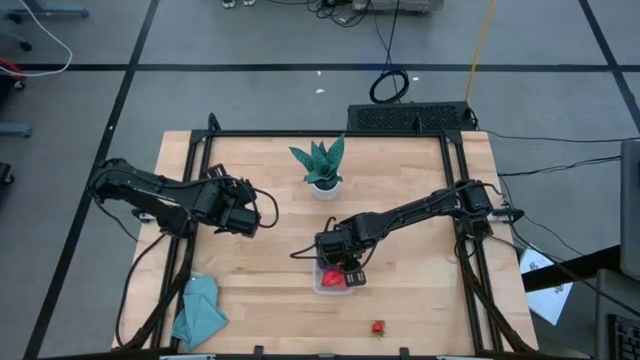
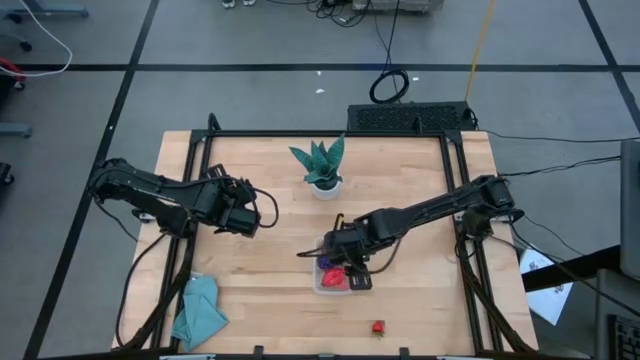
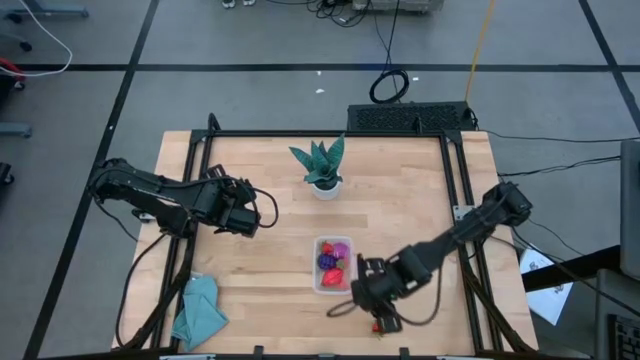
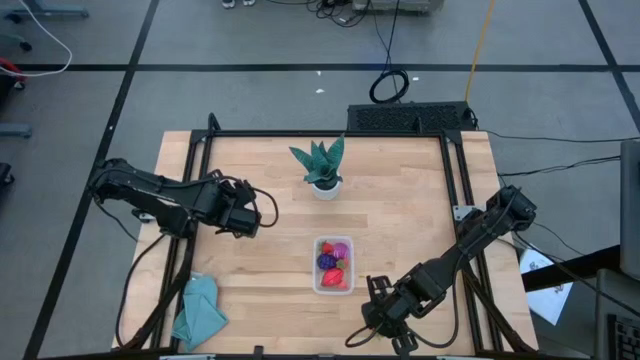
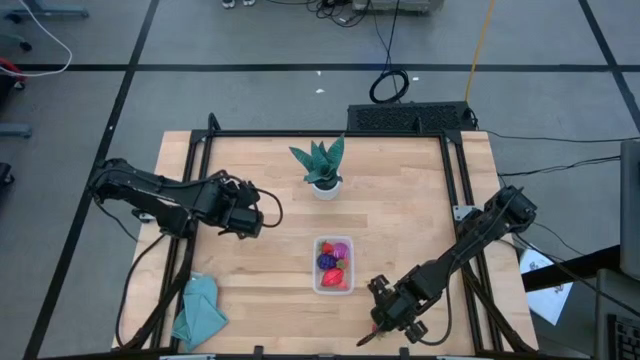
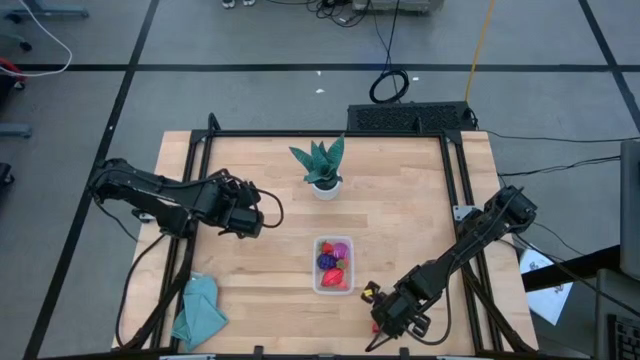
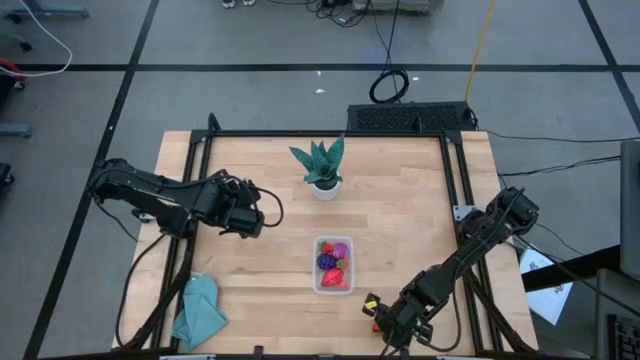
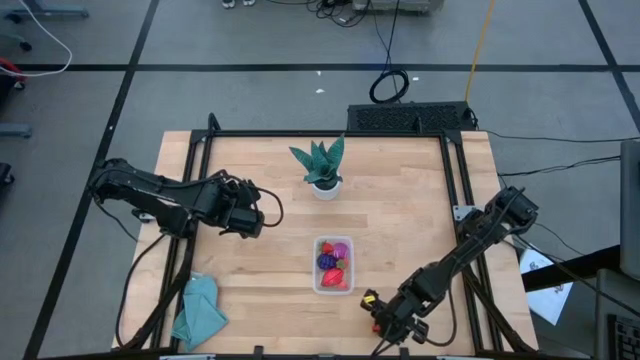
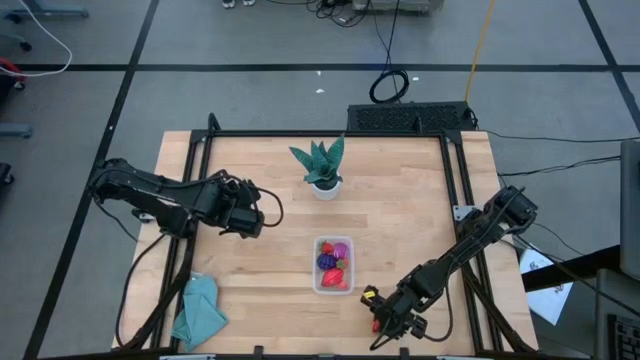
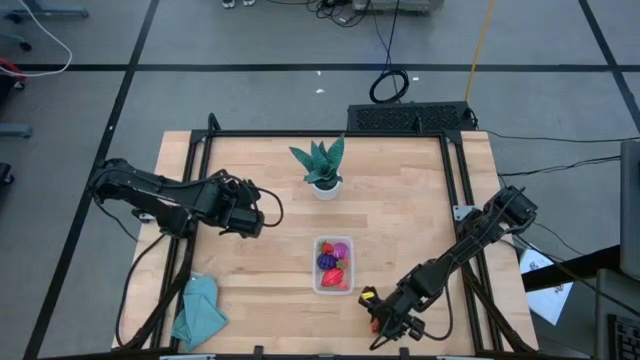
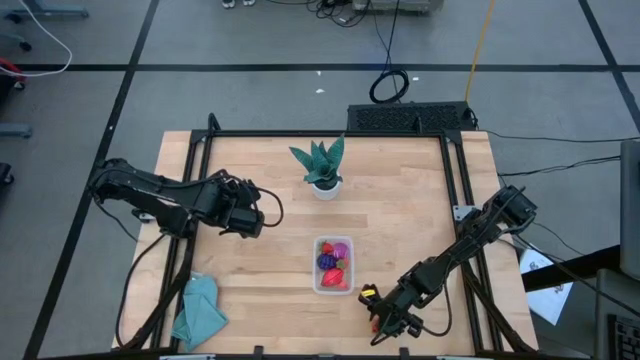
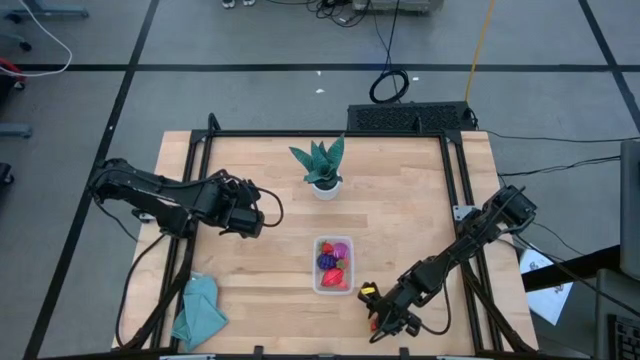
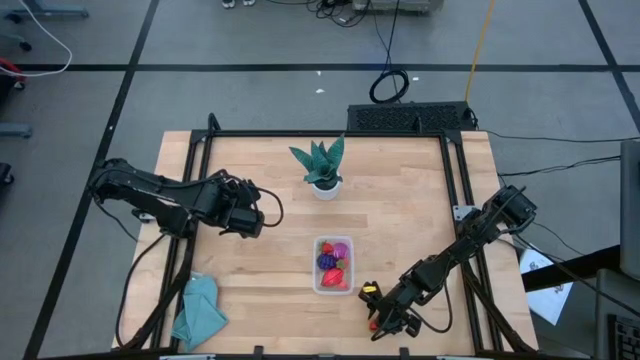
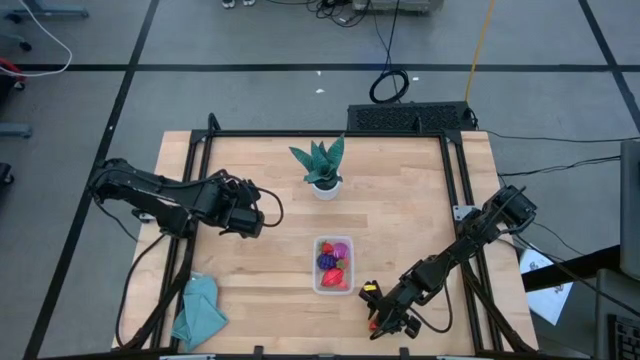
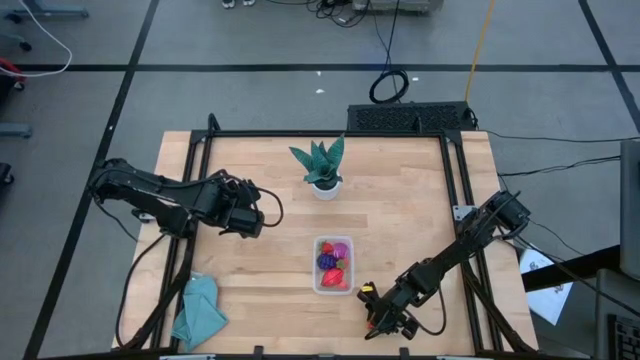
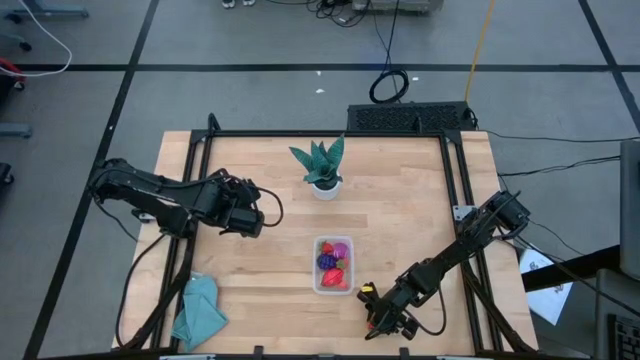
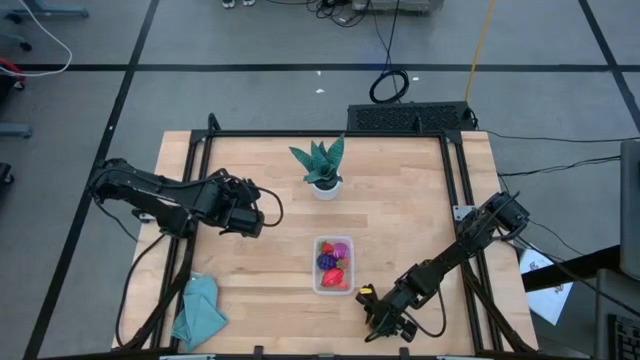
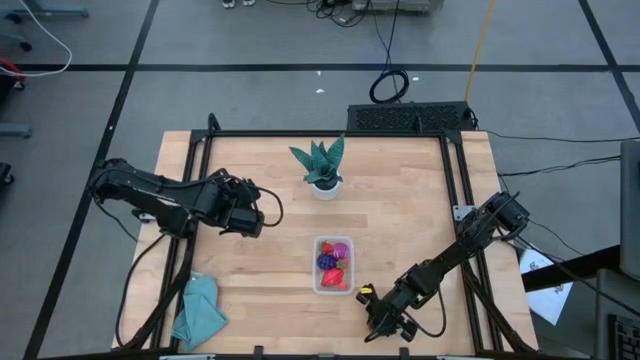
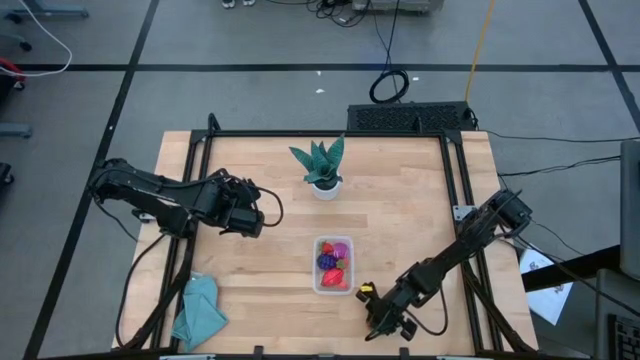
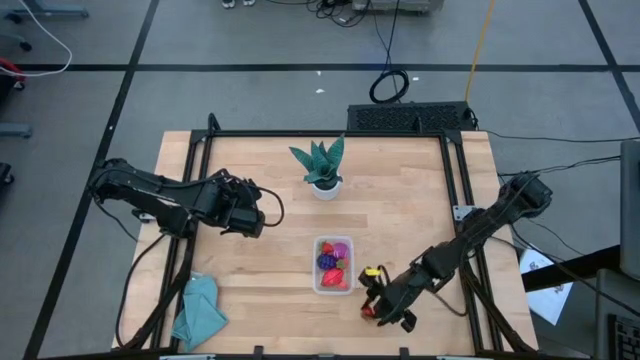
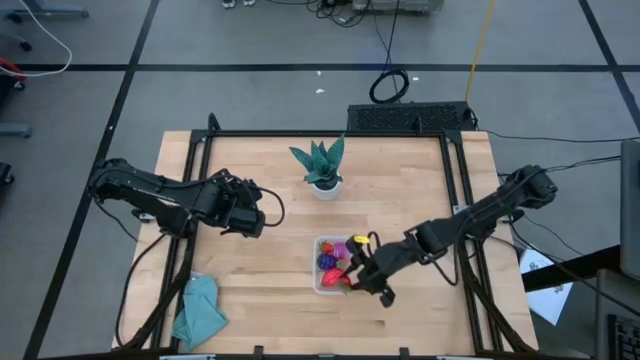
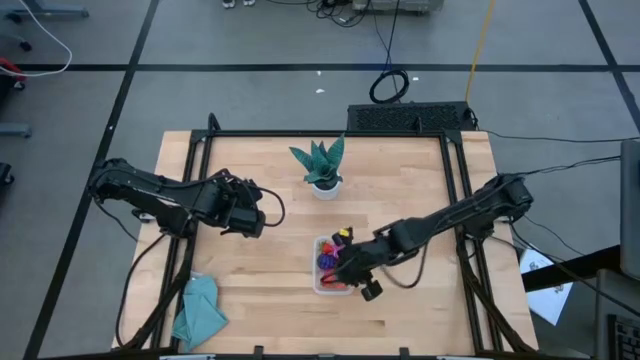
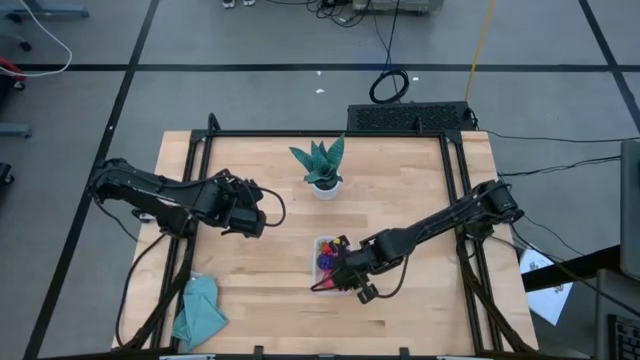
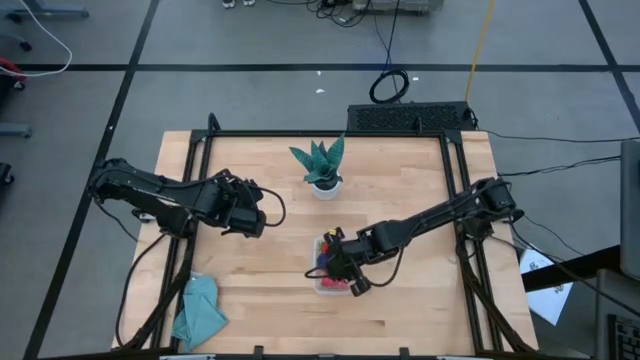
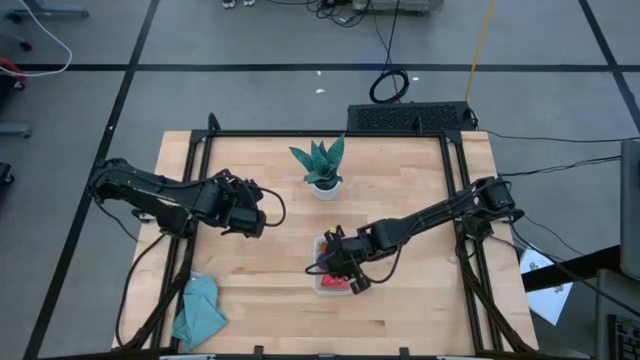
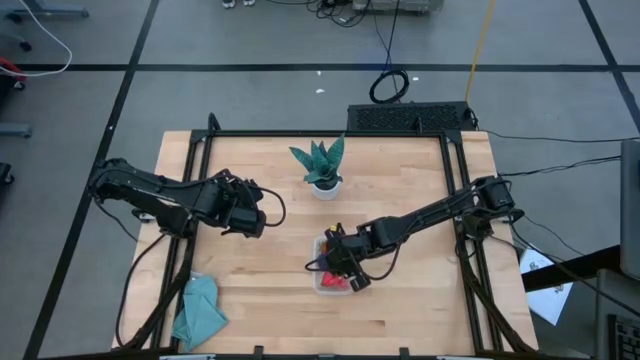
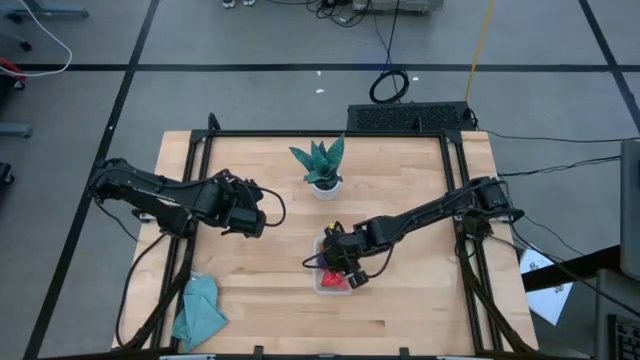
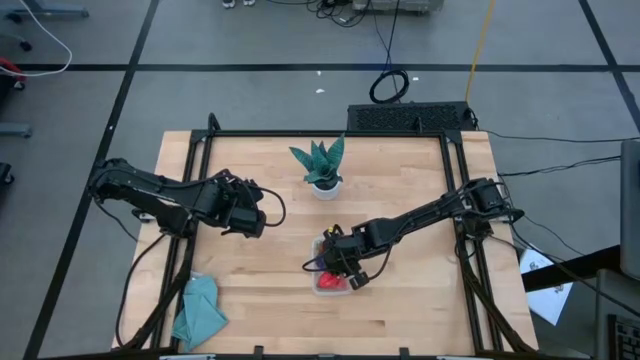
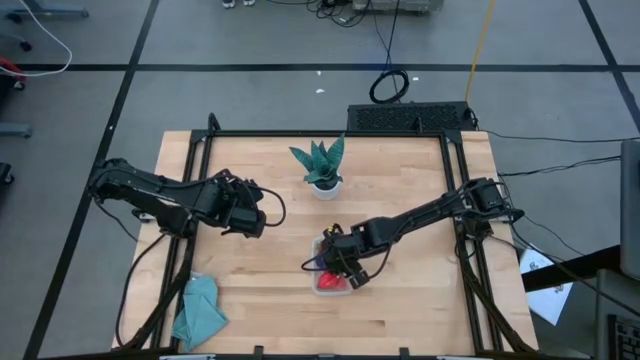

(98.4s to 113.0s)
Task: Pick and placing Produce into tupperware
Put the red strawberry into the transparent bin

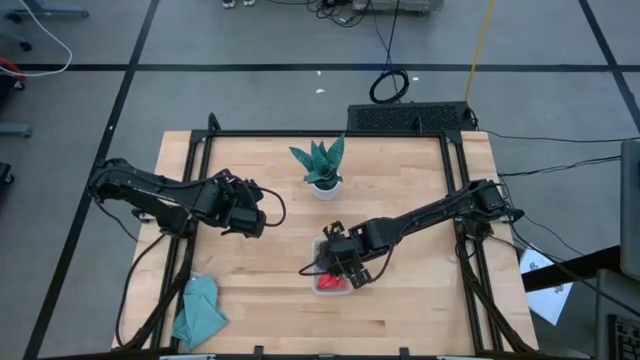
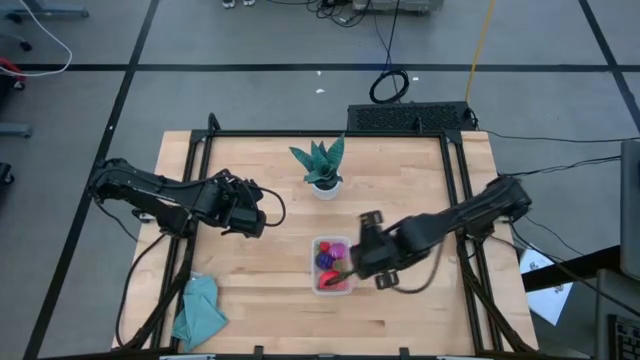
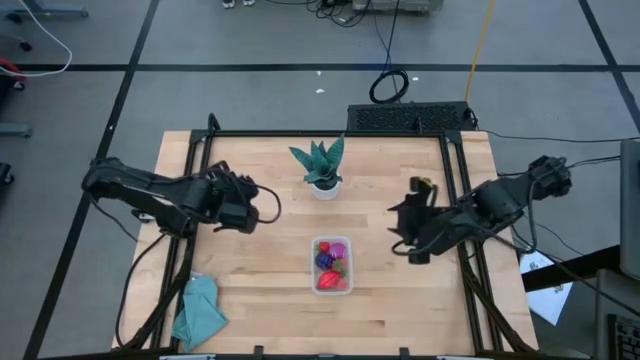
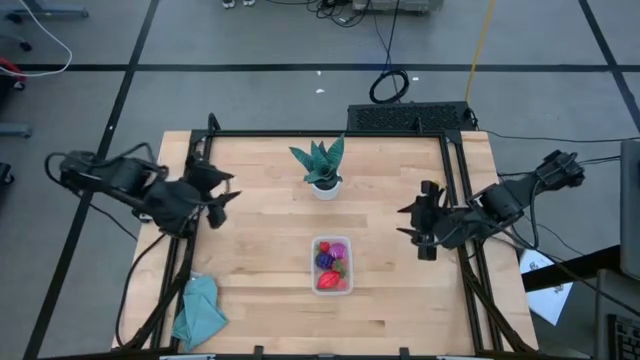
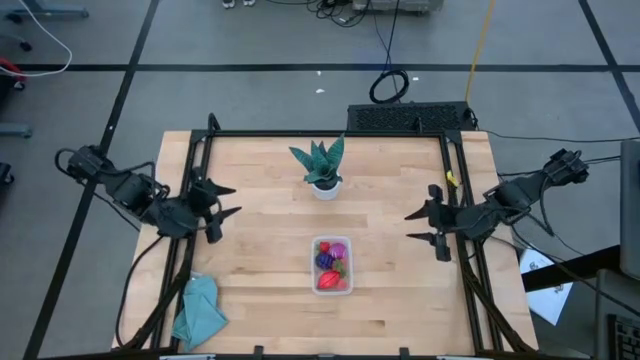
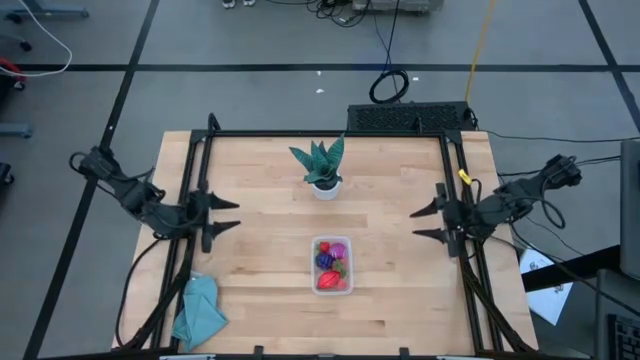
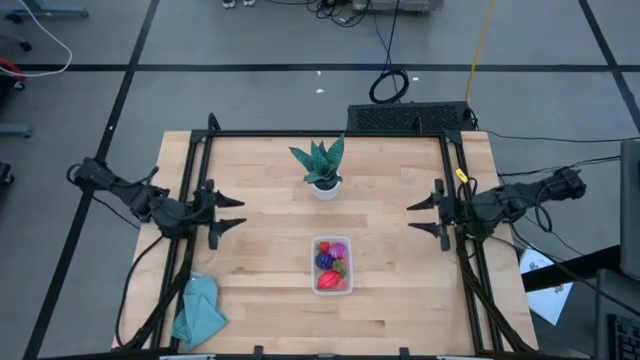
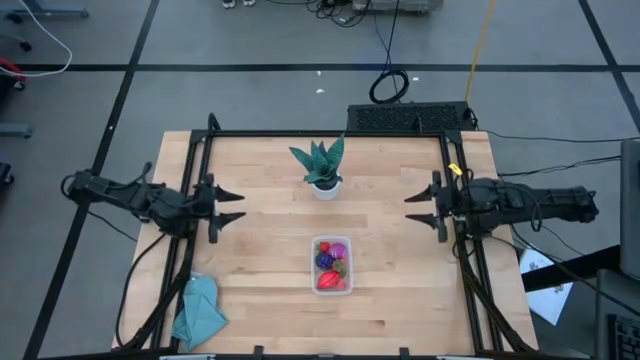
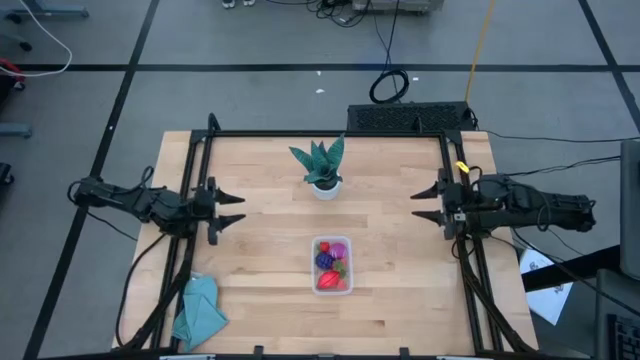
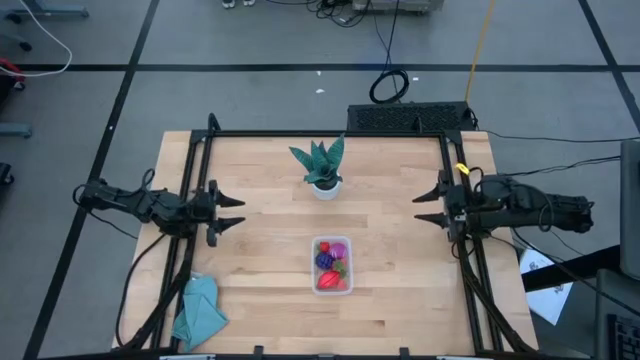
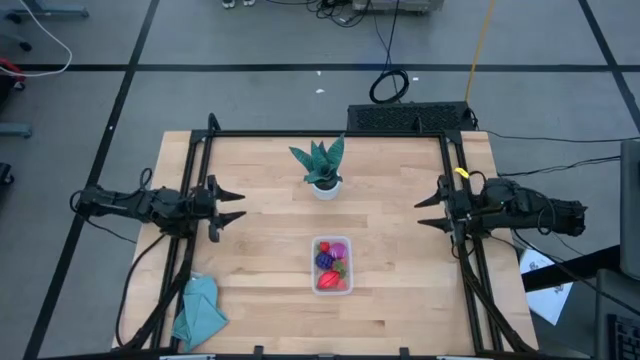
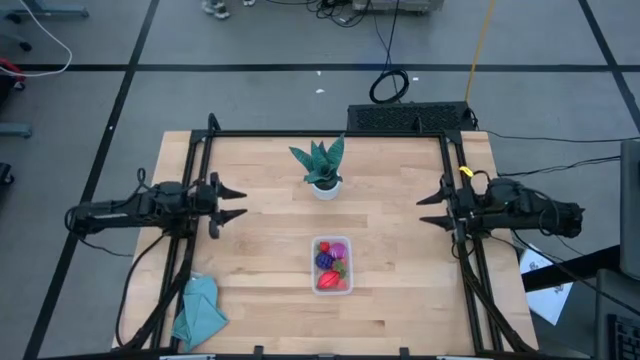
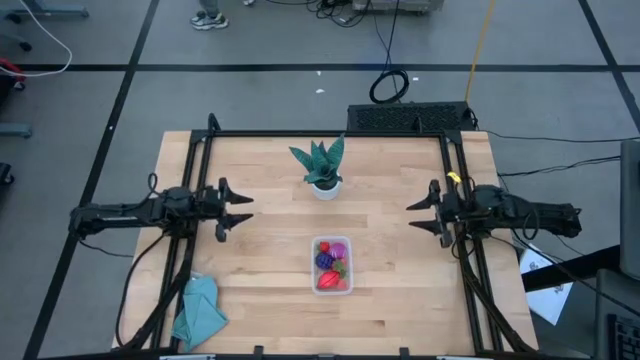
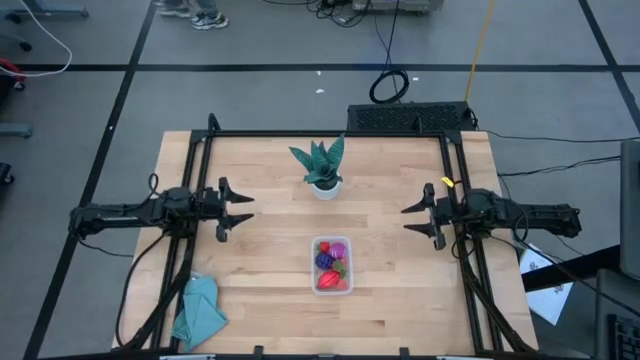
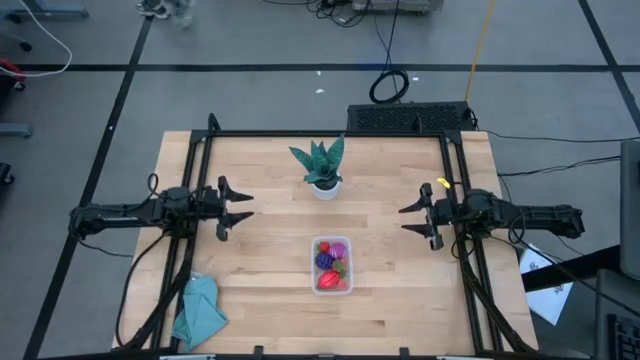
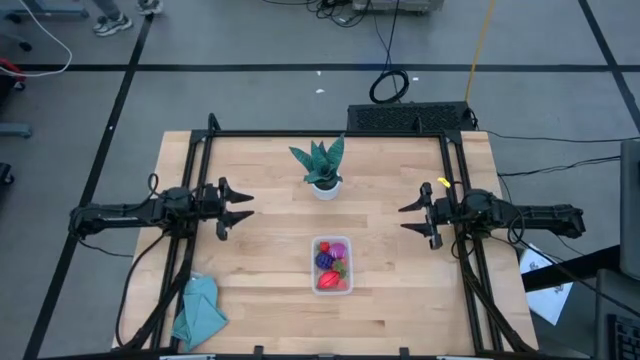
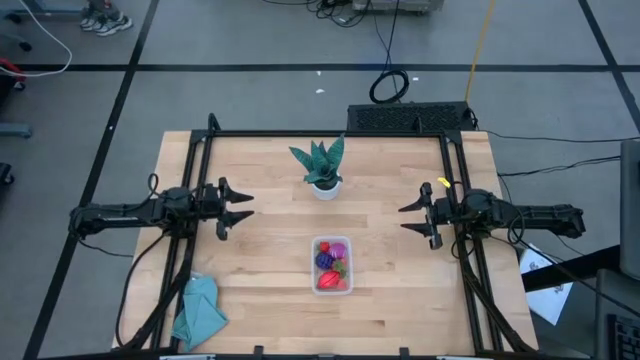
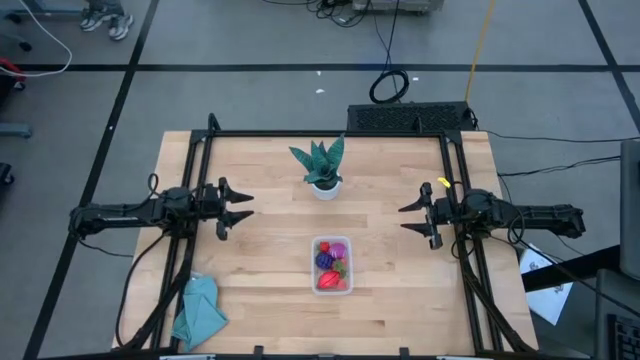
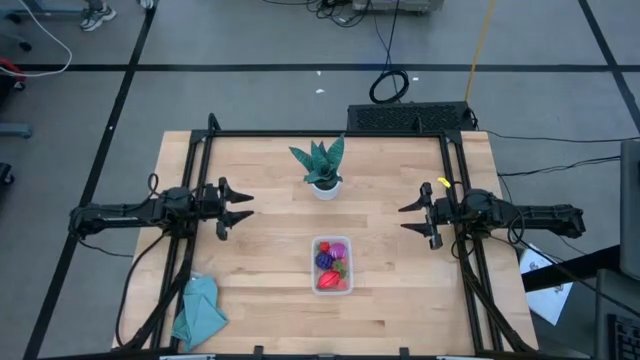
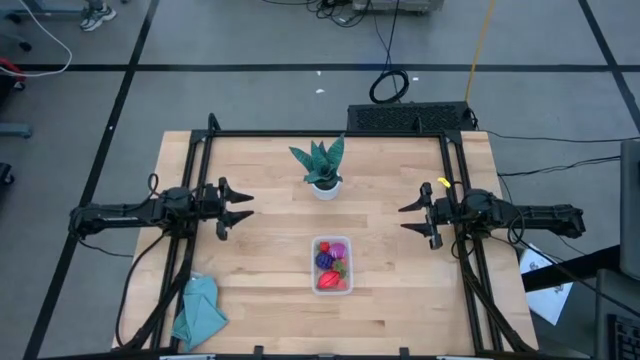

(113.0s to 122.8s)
Return to Home Position
